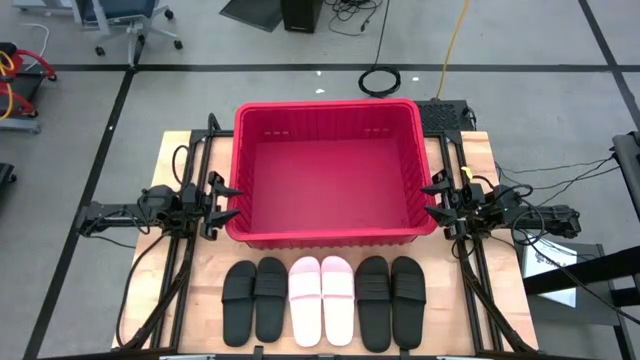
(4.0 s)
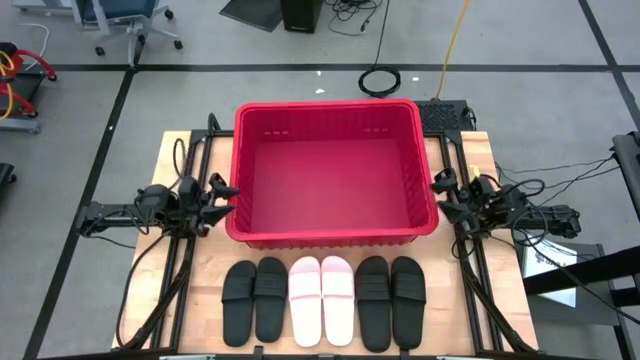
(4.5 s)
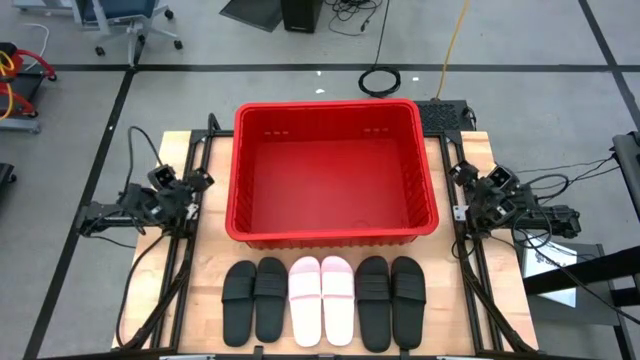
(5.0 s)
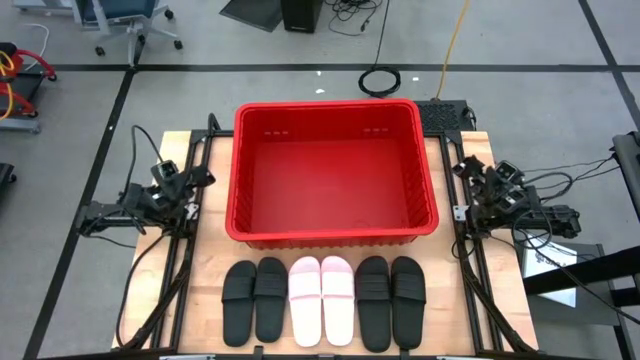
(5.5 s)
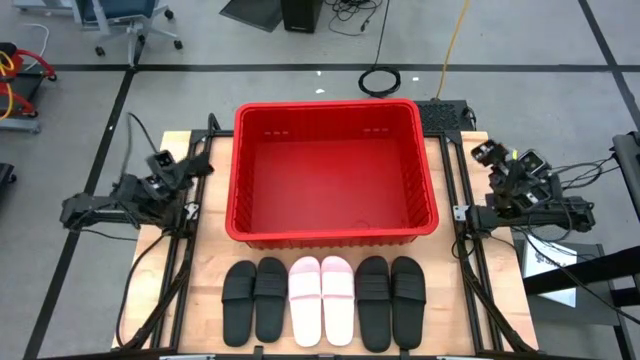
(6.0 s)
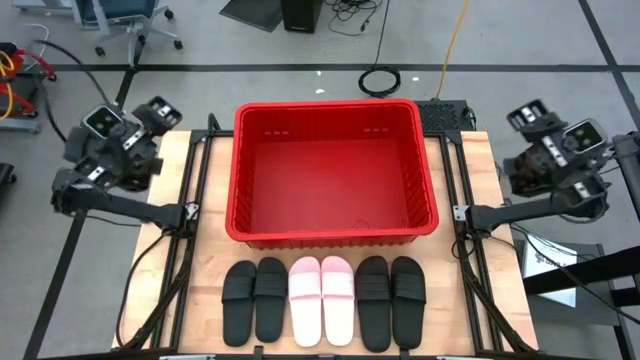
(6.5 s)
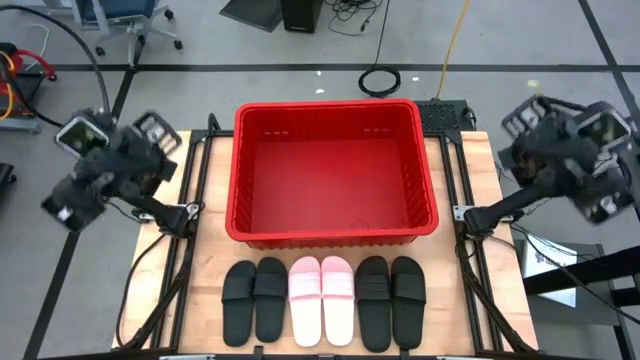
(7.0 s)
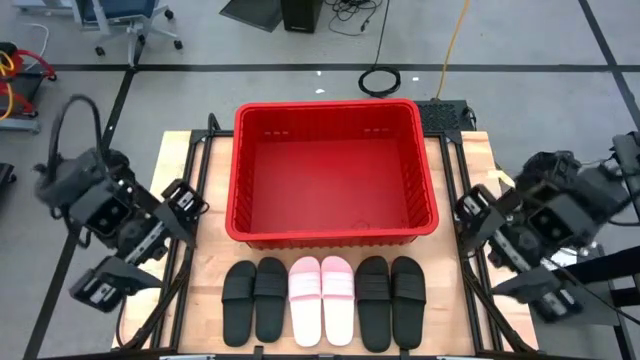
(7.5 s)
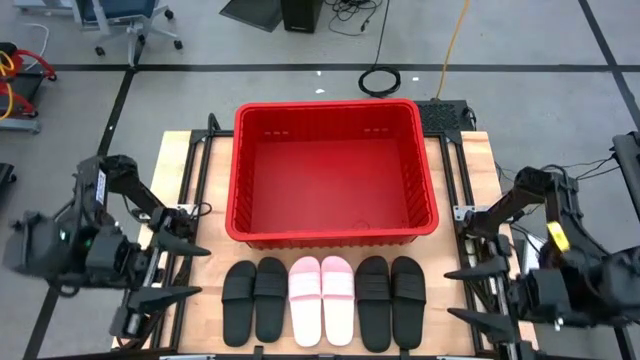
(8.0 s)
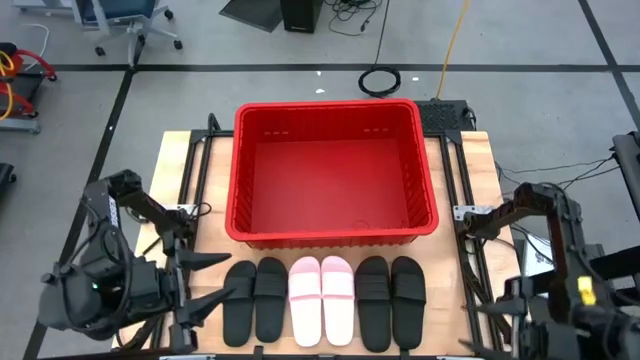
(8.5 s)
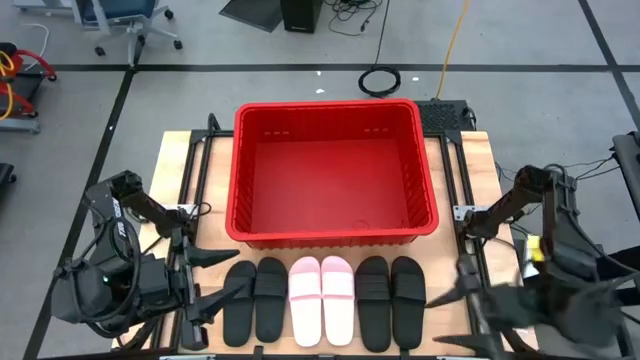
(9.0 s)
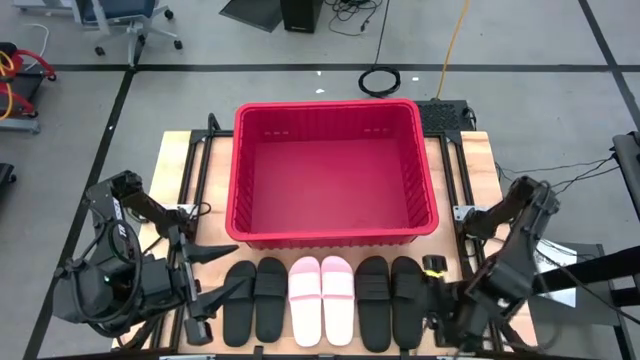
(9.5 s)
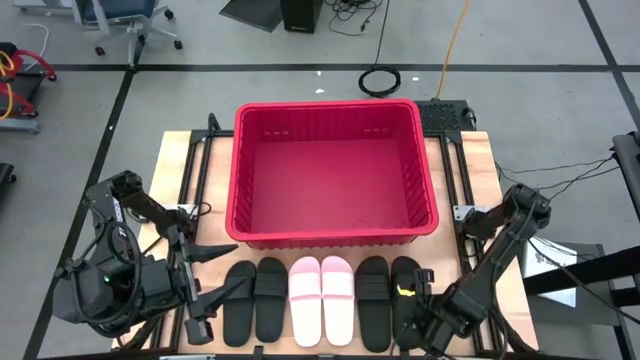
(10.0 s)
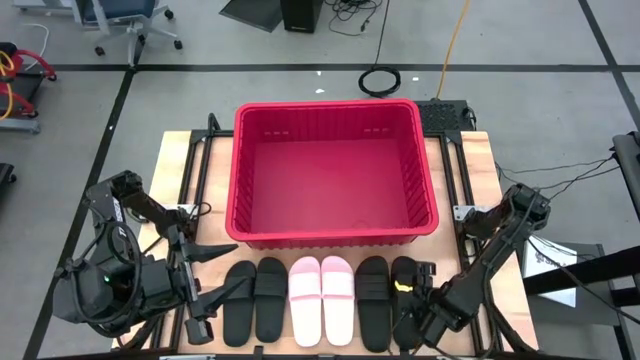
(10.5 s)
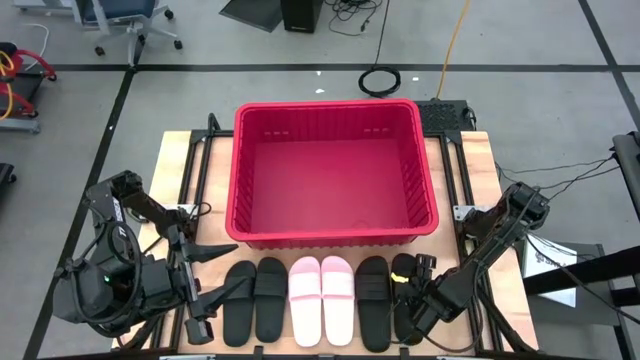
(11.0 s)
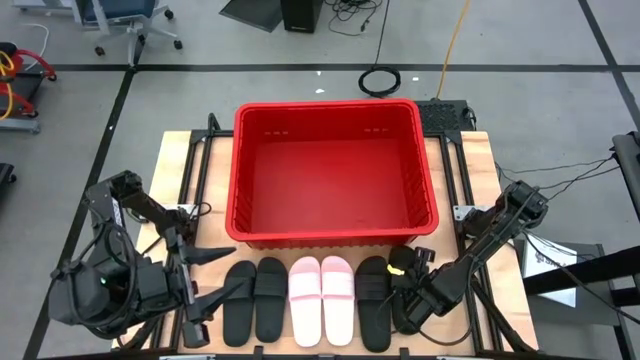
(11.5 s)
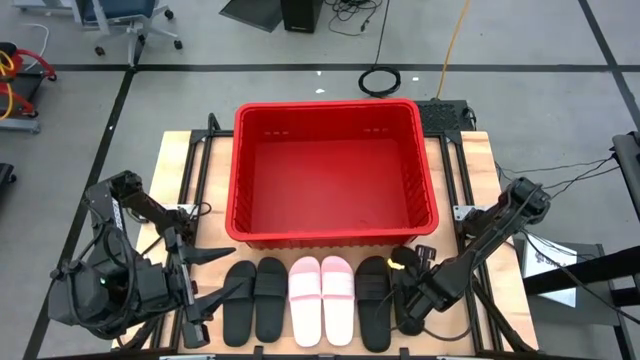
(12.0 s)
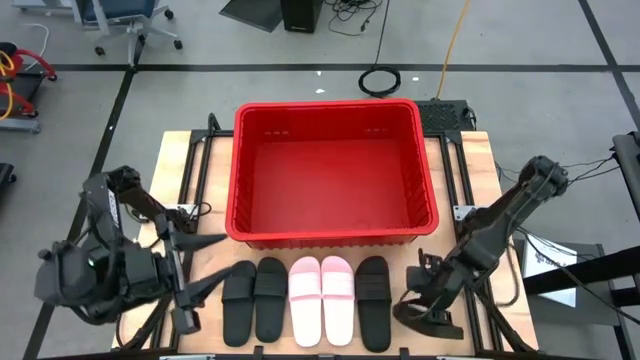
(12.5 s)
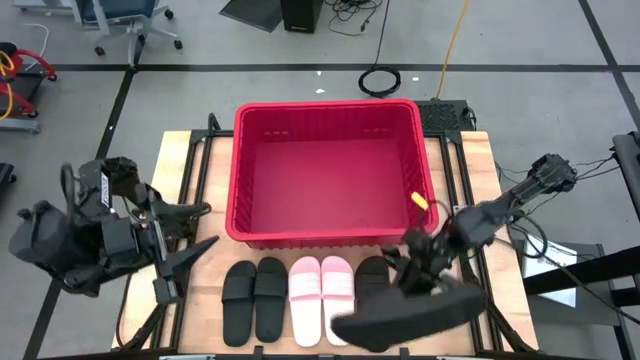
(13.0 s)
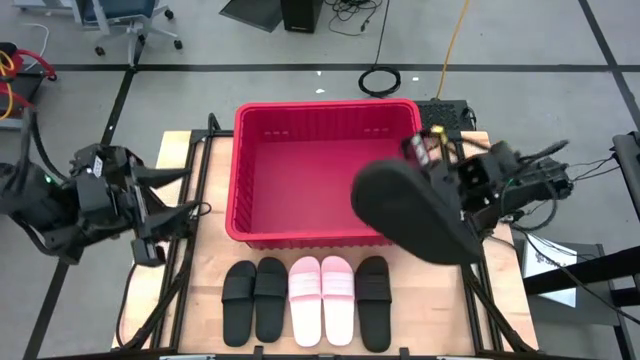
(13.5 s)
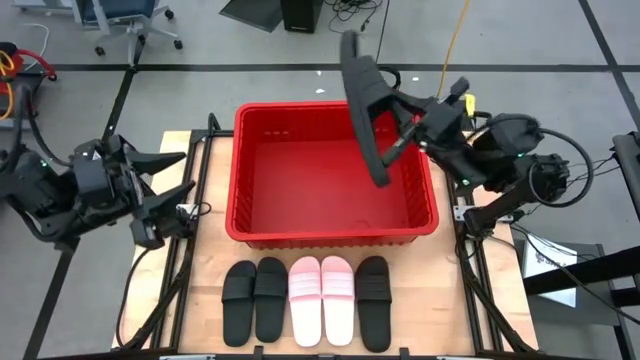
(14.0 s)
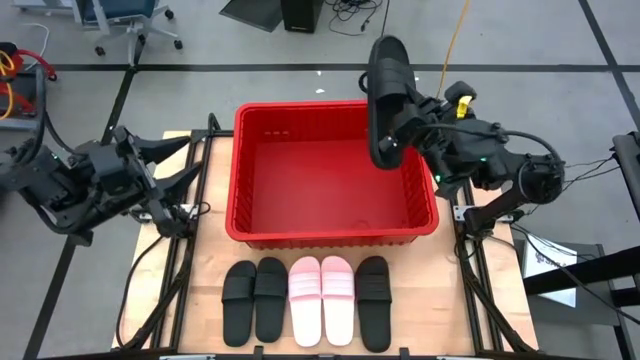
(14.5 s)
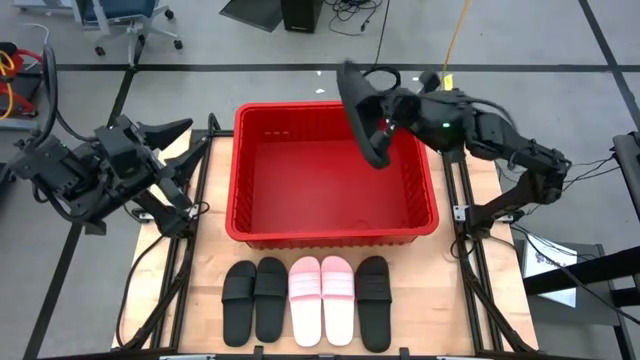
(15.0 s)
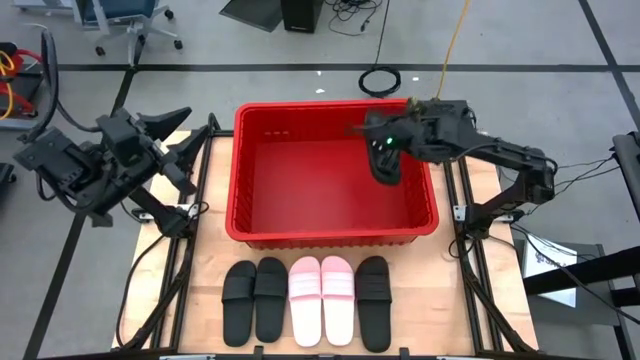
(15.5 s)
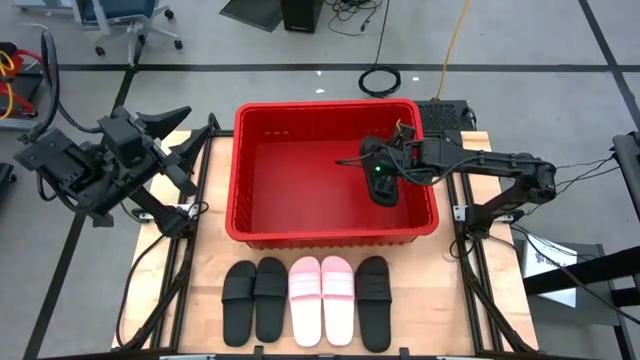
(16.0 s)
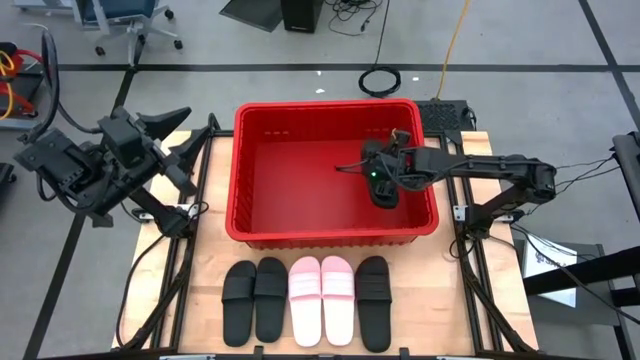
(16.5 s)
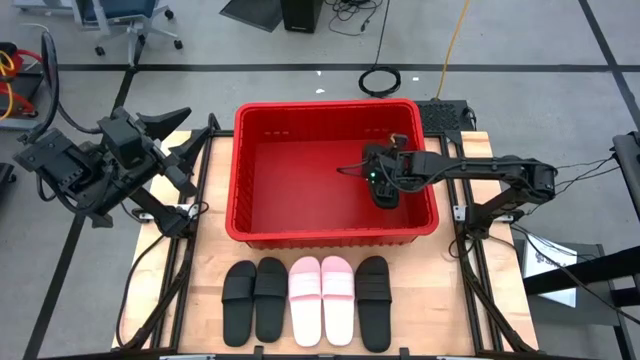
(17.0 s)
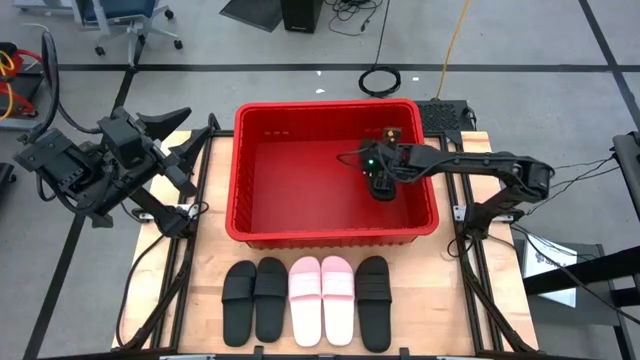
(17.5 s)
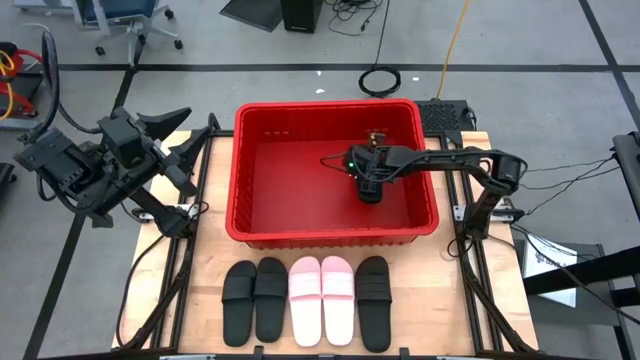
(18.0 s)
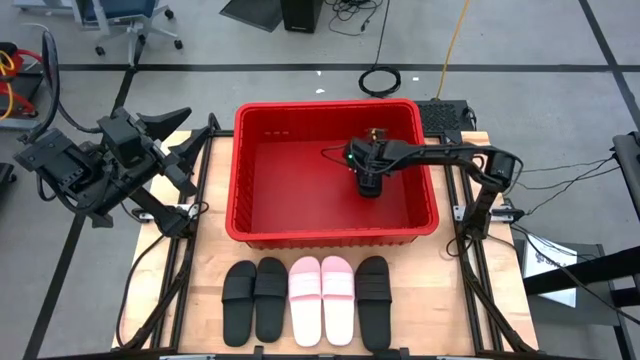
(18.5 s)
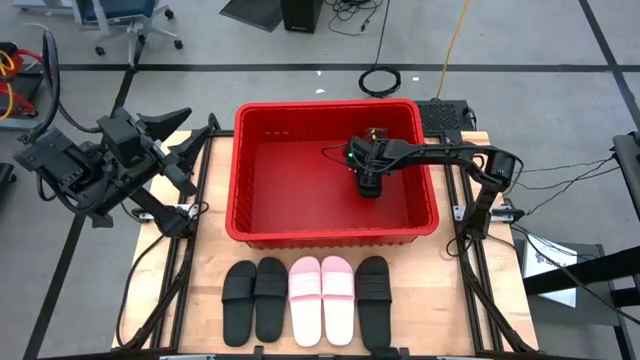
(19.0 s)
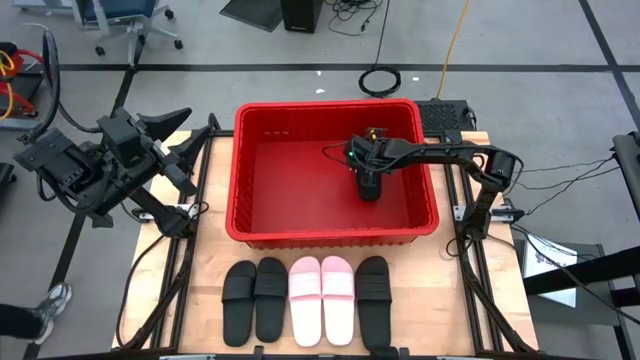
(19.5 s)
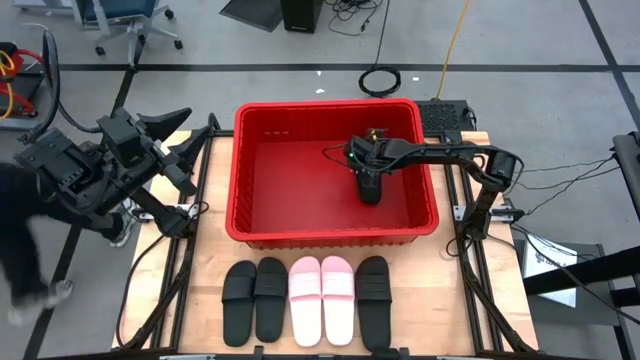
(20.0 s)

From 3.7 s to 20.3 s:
Task: Pick and place slides into bin
Put the black slipper into the red container
